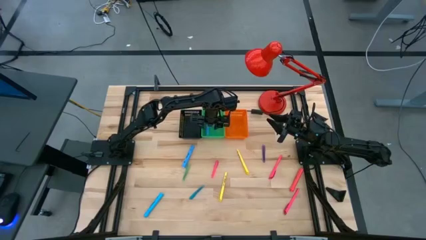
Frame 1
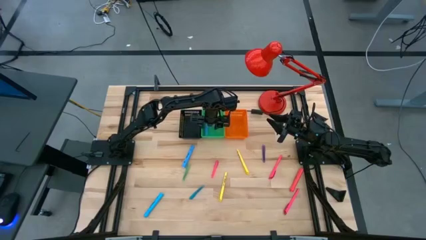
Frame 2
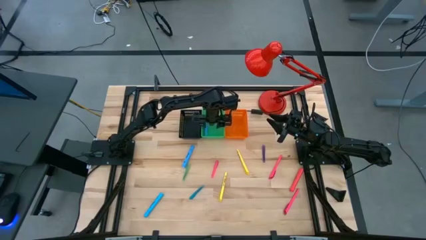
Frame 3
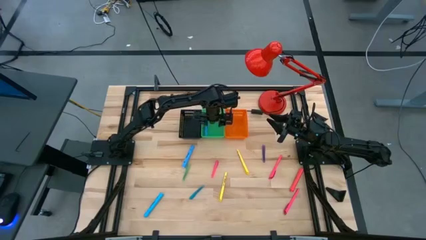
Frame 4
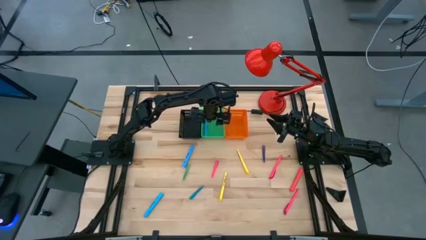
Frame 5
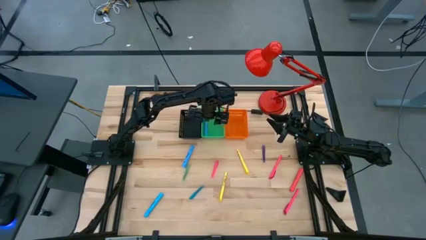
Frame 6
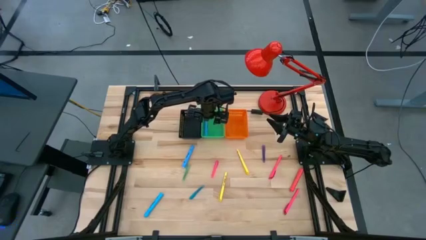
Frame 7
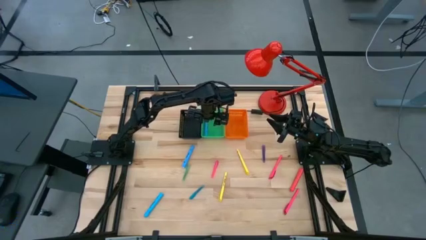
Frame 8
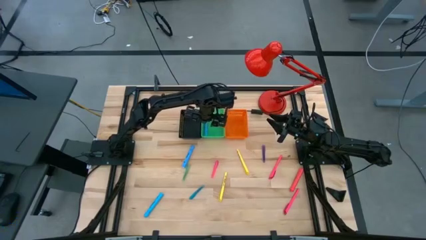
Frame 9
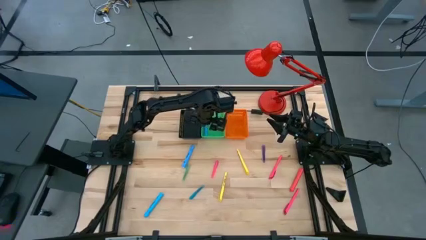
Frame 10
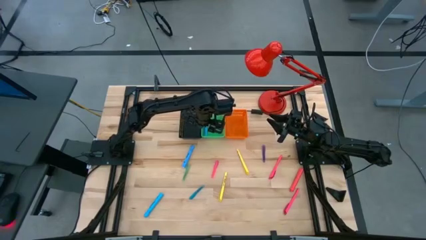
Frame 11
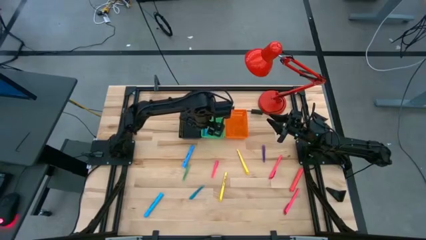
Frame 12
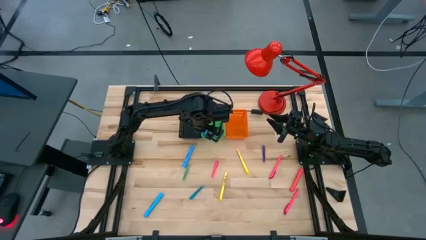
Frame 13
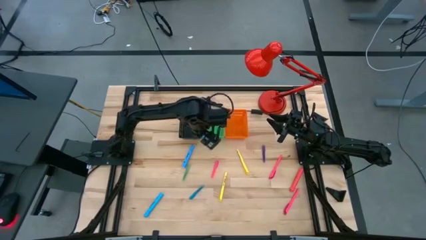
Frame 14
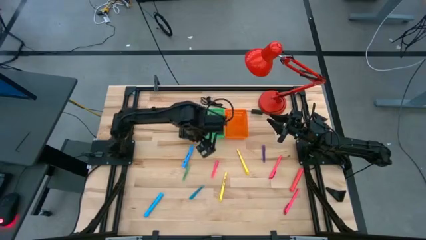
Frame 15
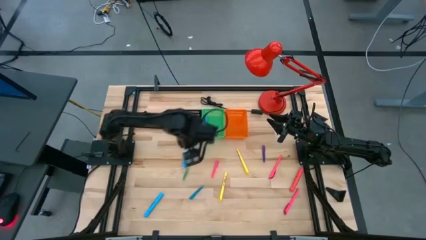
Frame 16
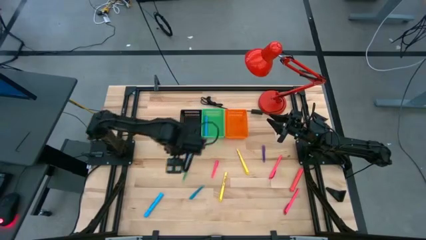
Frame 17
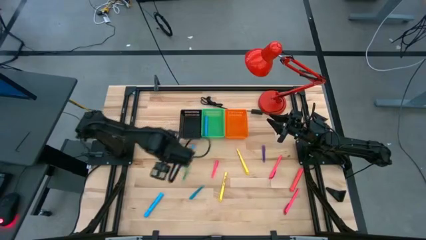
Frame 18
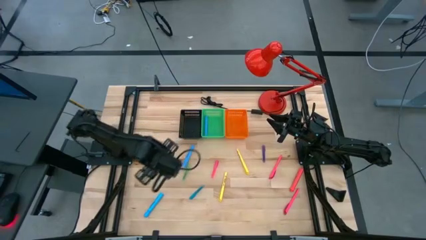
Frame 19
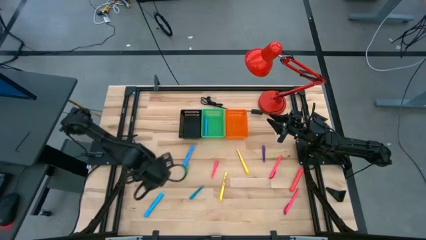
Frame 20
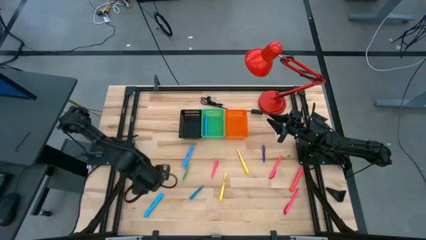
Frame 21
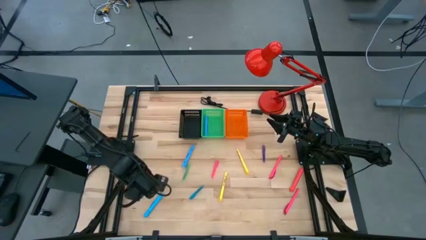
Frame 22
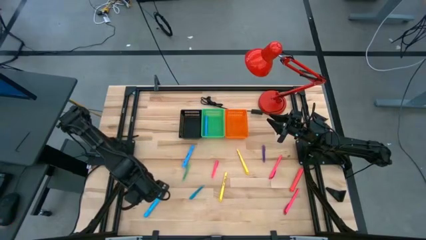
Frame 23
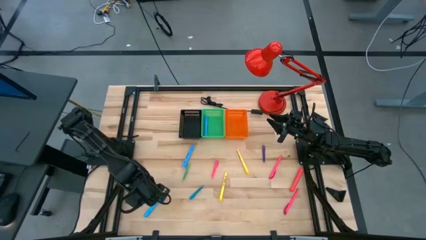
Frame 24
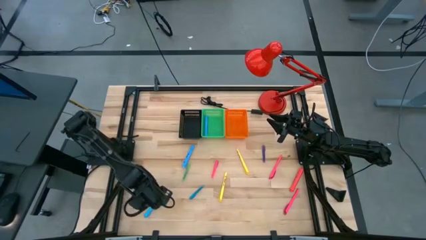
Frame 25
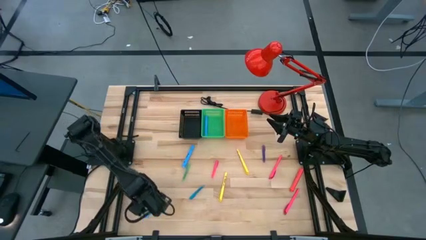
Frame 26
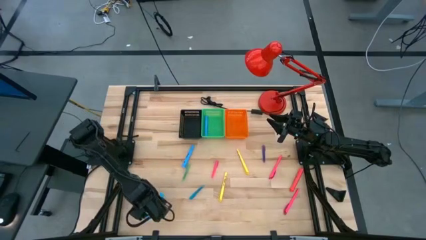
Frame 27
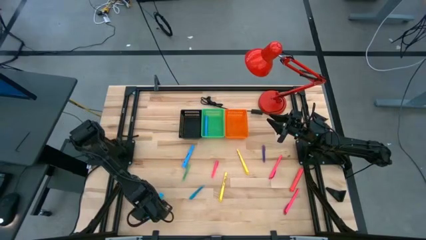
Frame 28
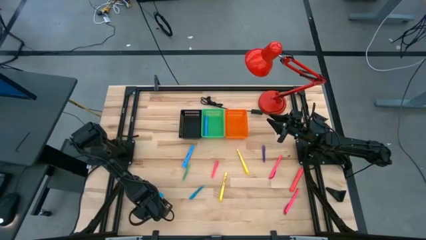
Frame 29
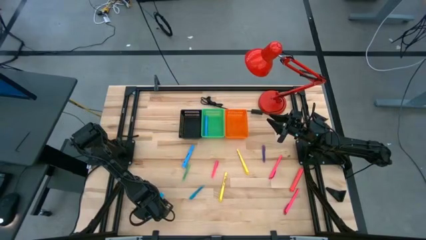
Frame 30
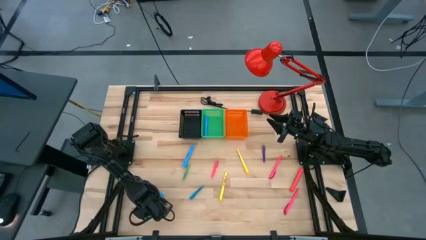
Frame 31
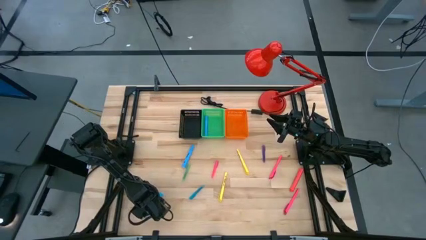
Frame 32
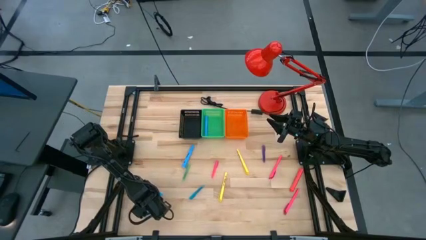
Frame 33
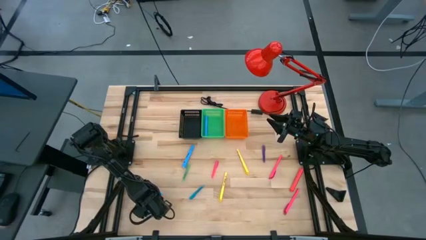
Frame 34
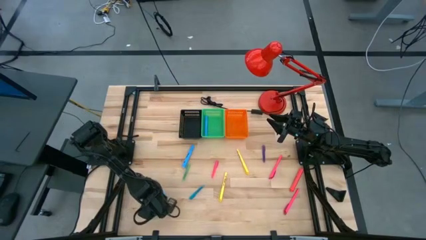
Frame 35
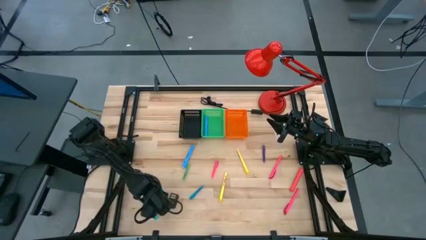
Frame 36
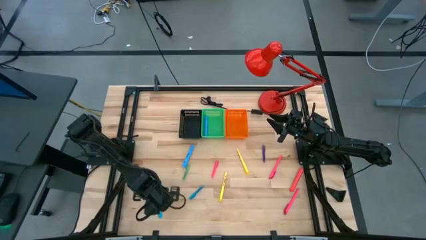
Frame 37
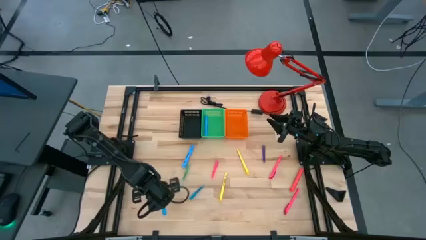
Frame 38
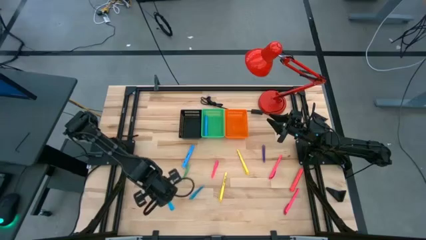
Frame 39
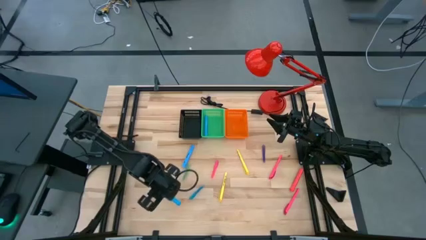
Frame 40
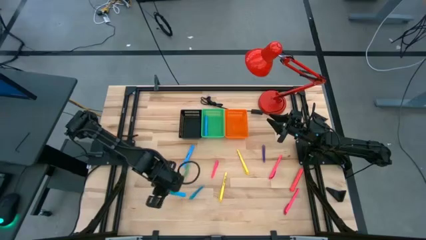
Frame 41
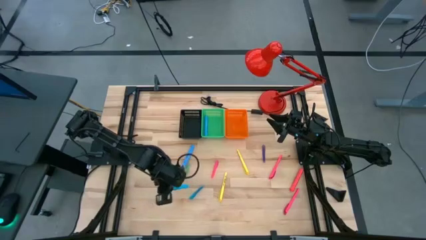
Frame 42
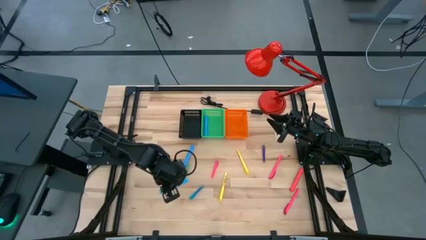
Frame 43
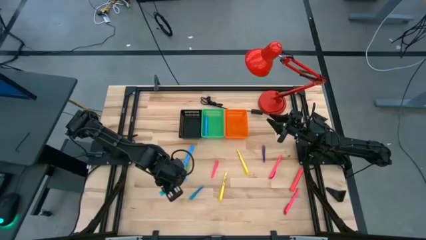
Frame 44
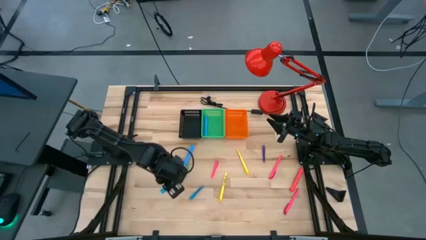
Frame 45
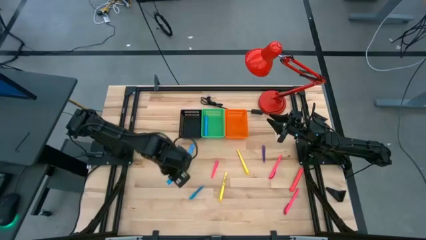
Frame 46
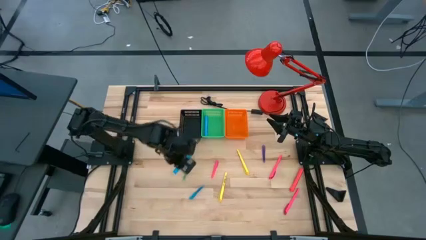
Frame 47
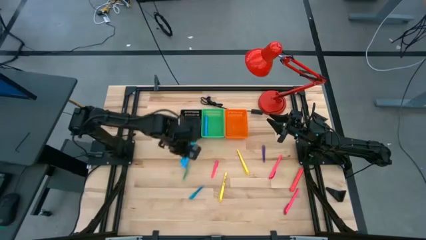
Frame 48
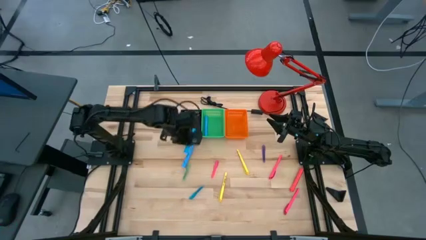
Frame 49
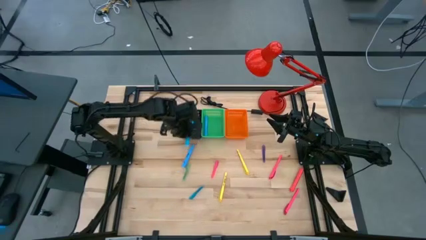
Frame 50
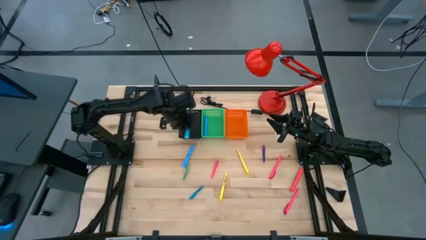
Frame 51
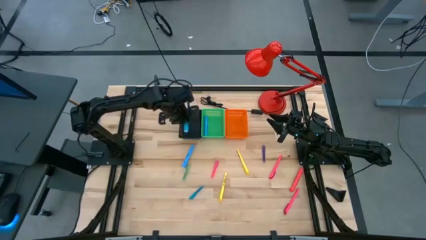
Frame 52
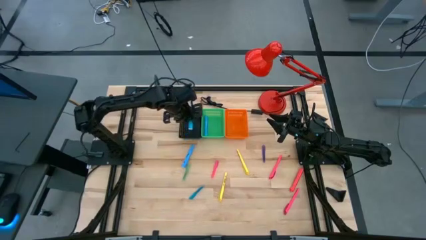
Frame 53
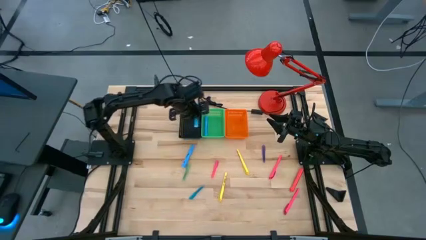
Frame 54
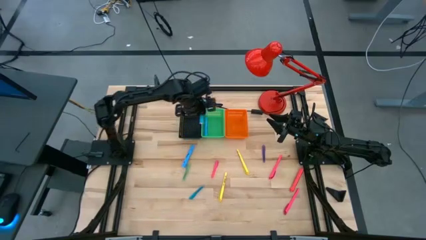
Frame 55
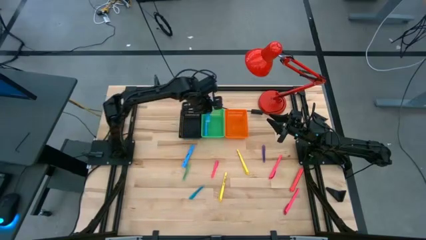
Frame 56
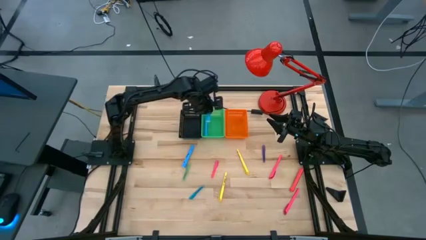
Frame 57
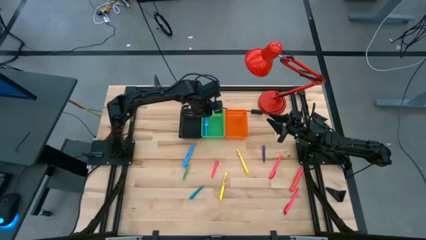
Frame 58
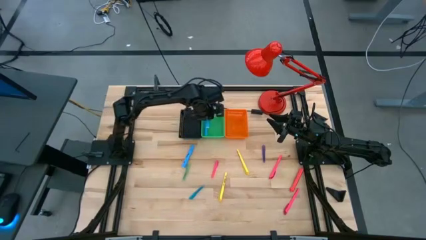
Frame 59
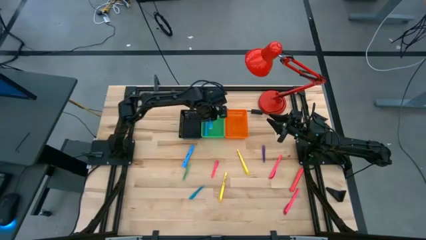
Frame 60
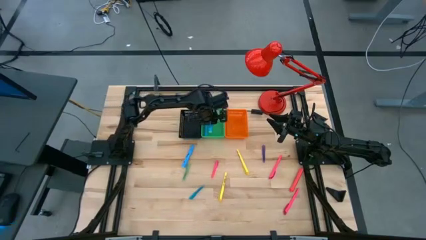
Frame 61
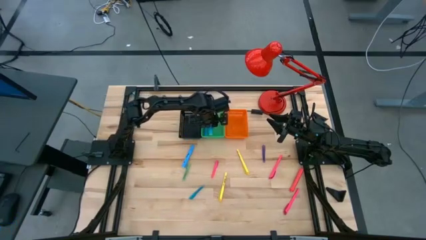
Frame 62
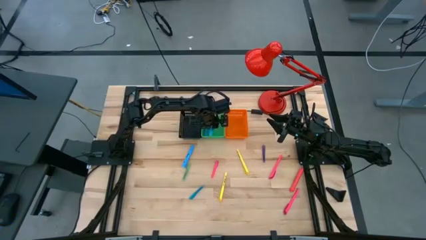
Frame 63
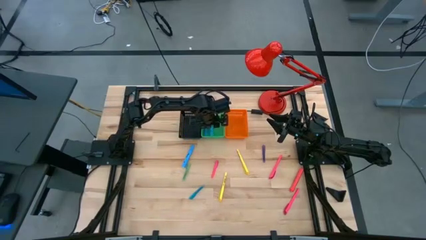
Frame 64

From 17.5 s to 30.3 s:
Task: Pick & Place Markers
Put the bottom large blue highlighter pen into the green bin
